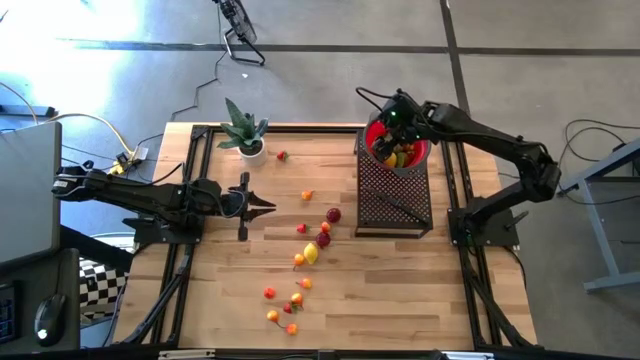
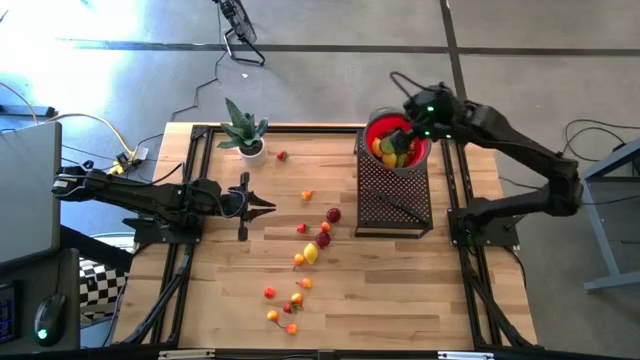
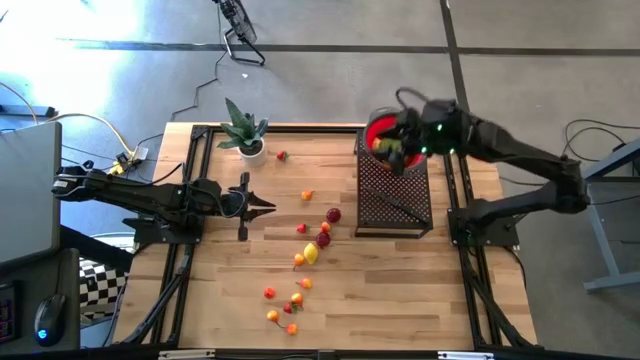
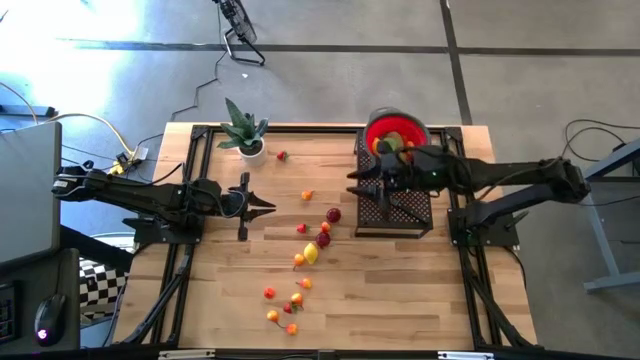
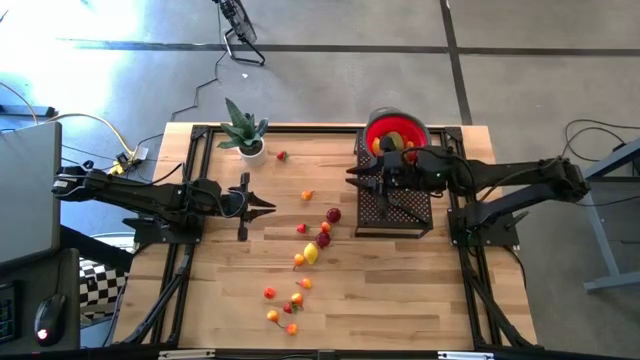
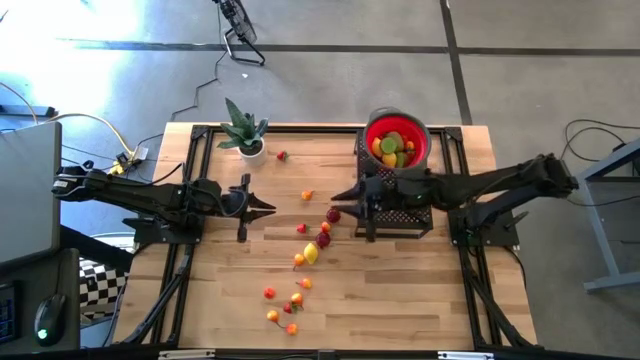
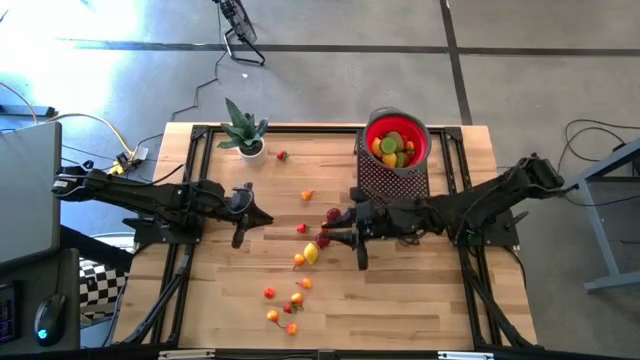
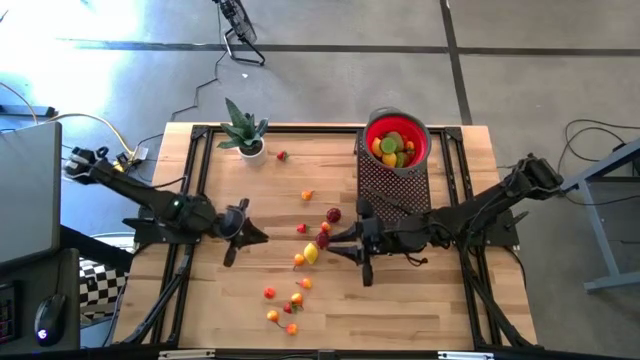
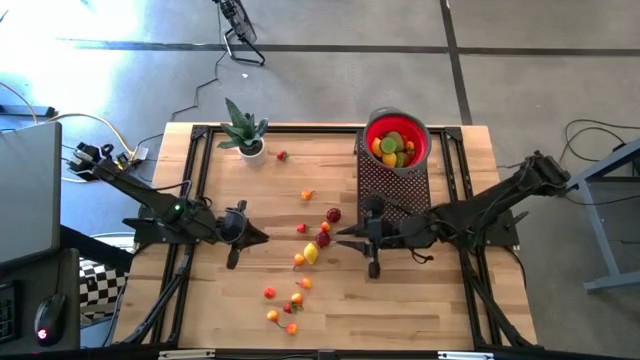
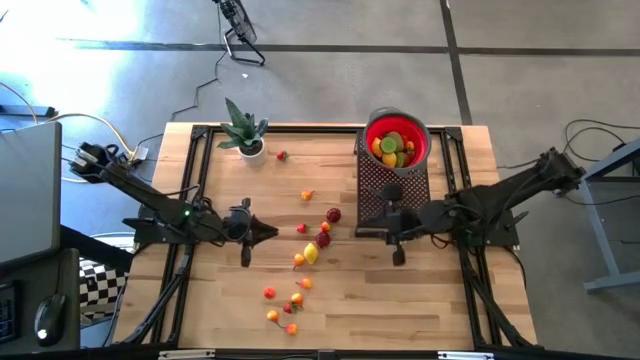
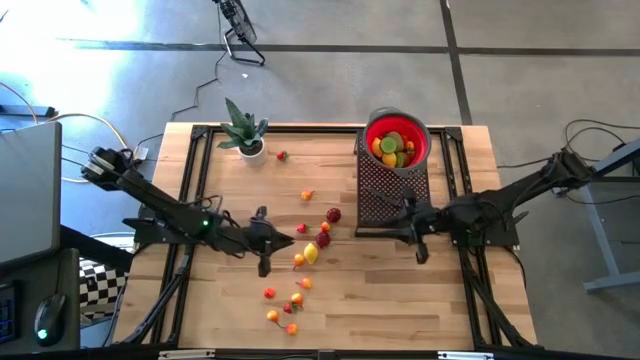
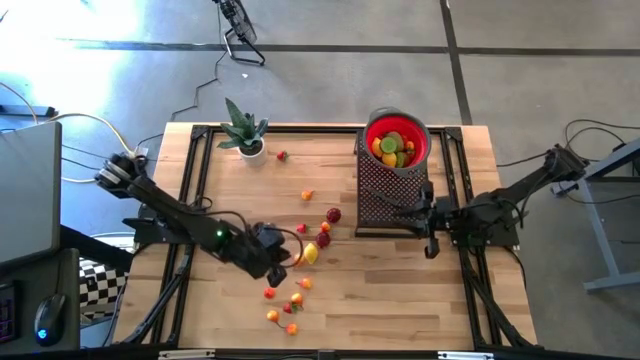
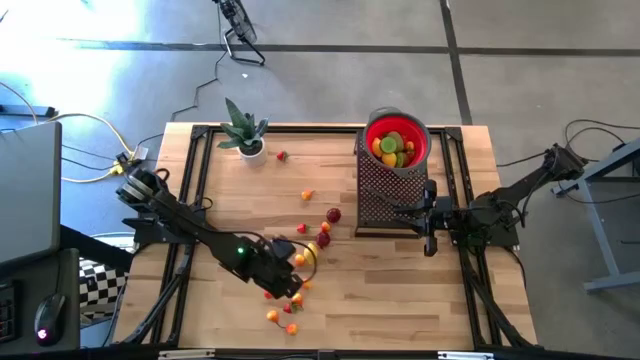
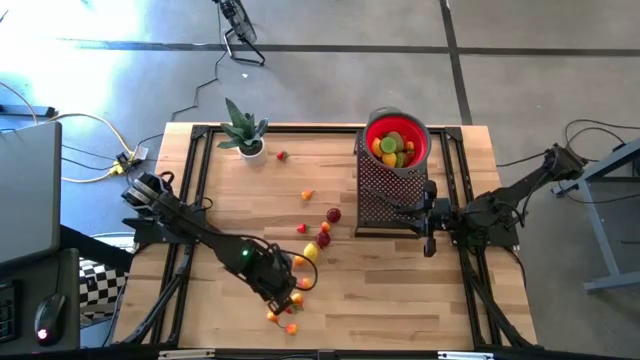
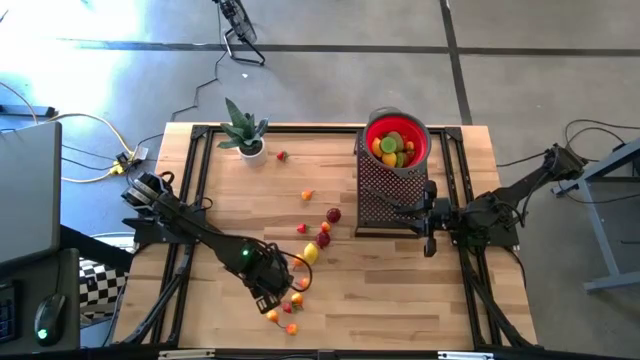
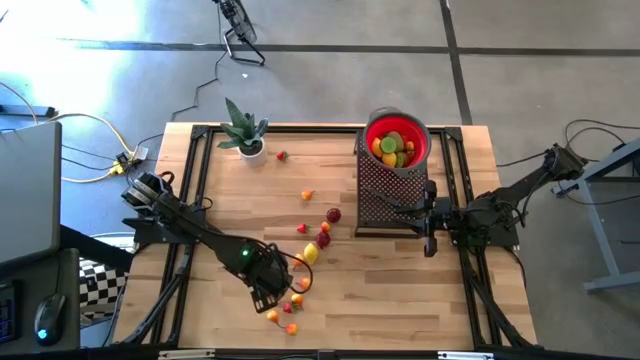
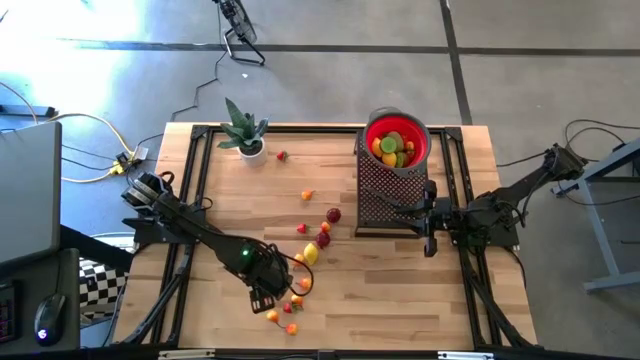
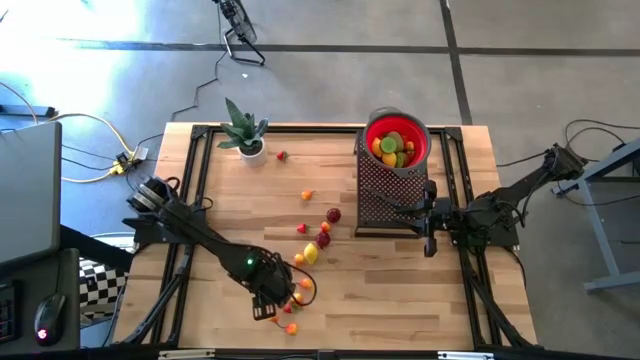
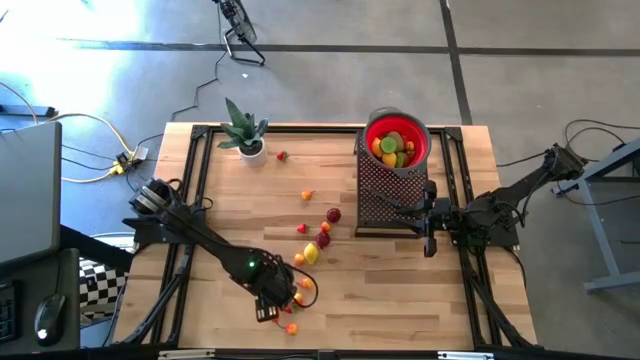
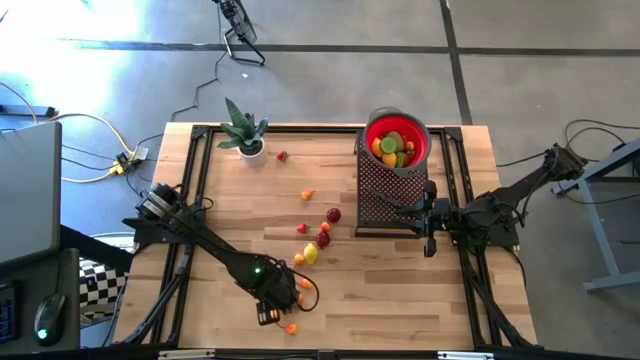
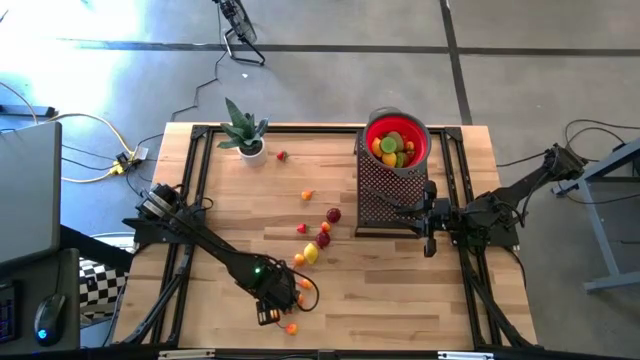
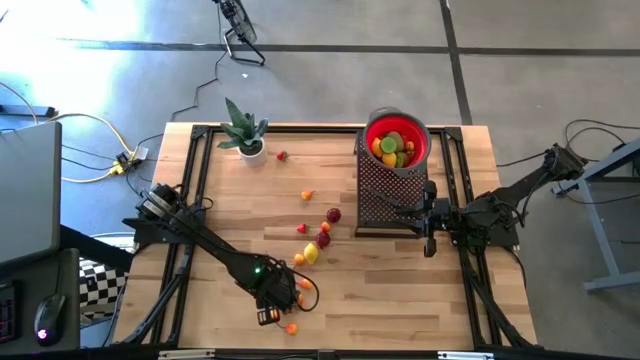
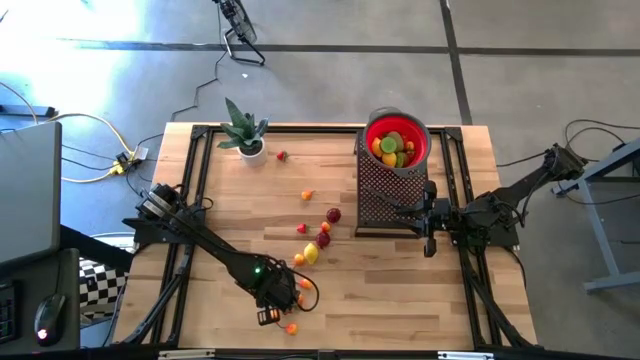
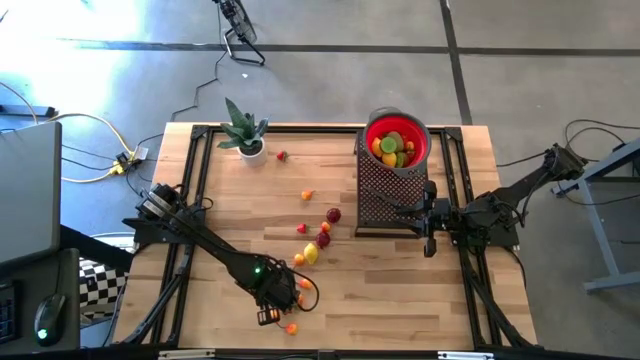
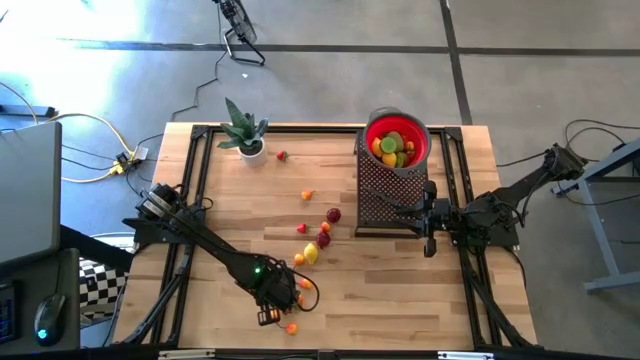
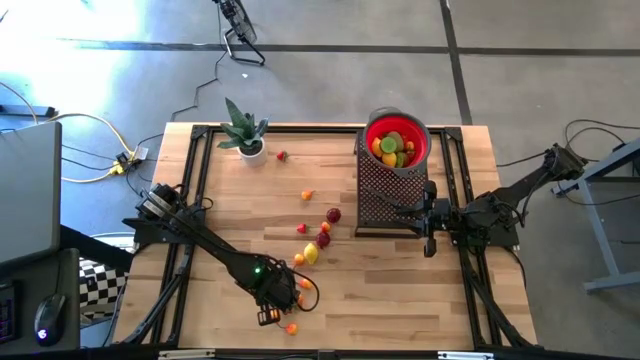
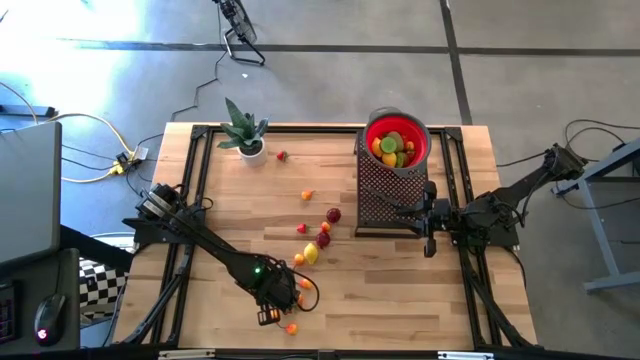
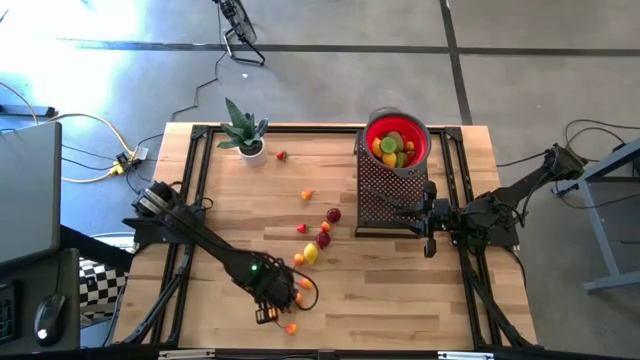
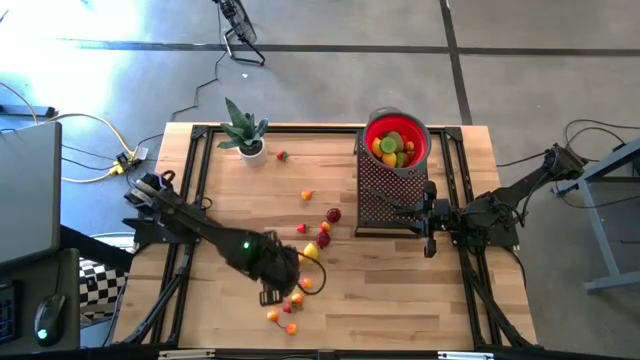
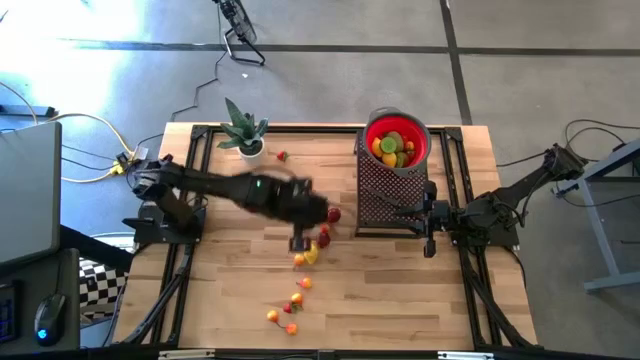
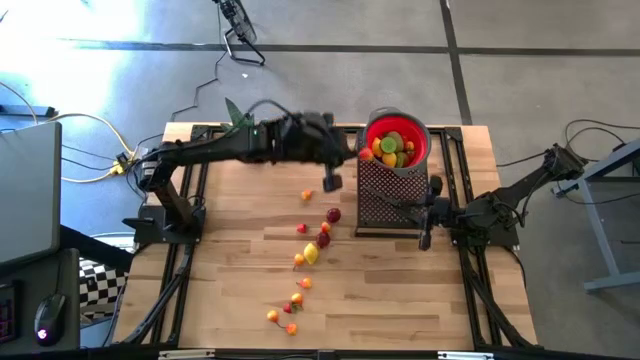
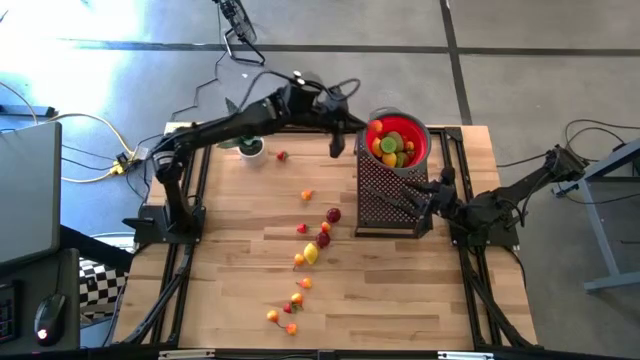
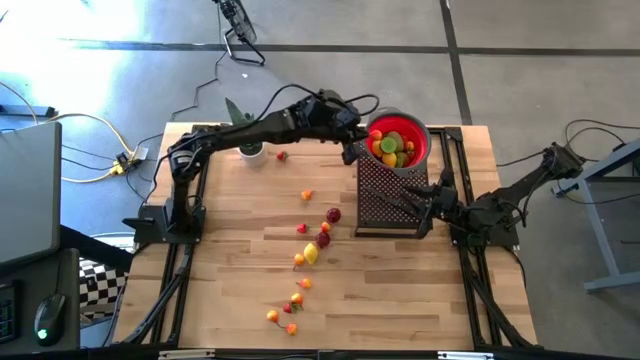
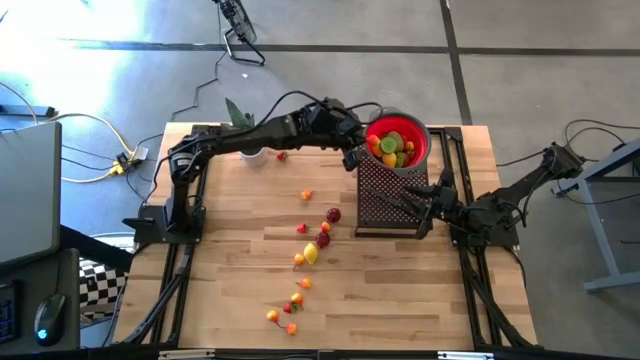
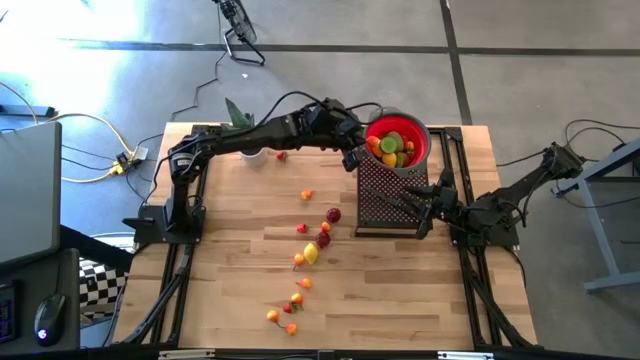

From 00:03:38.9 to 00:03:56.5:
Task: Pick & Place Fruit
Put the pear into the strainer bowl on the shelf

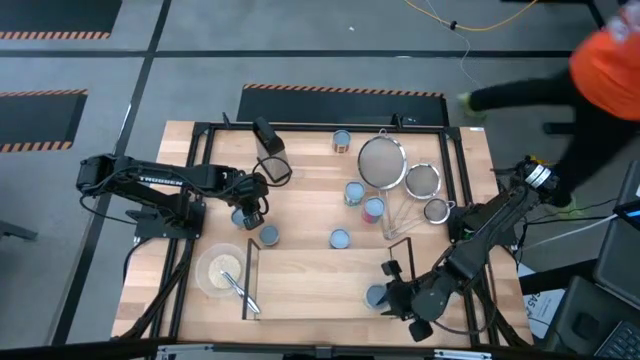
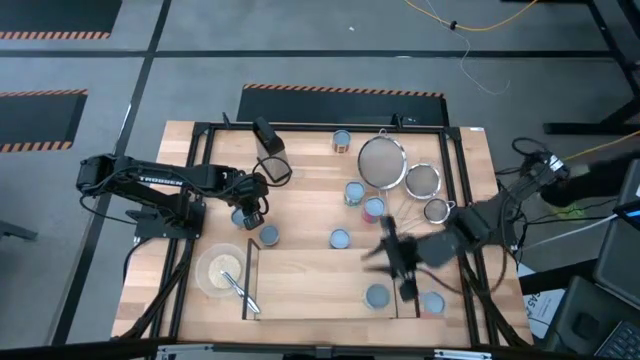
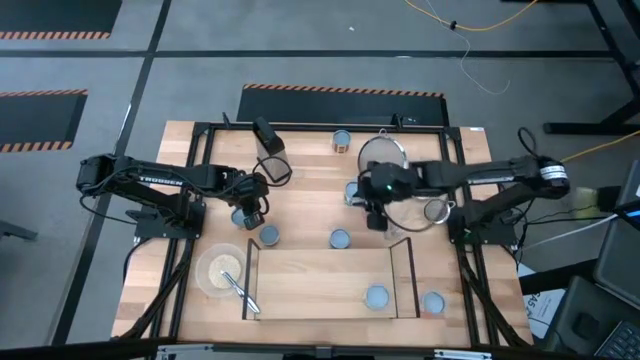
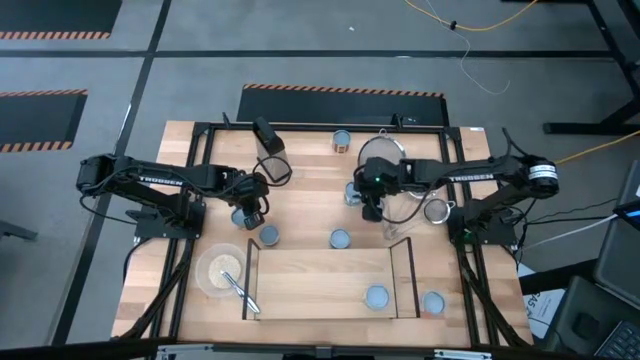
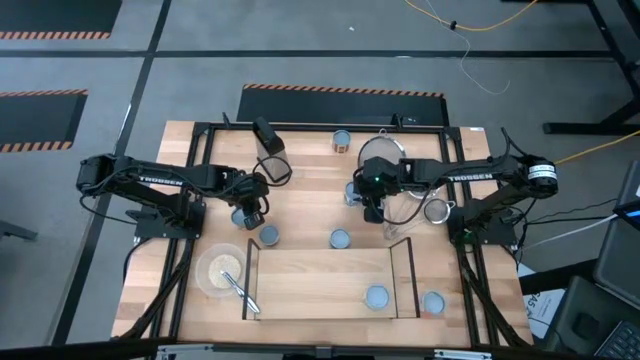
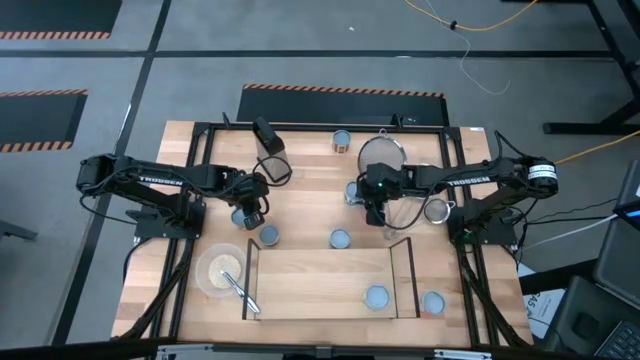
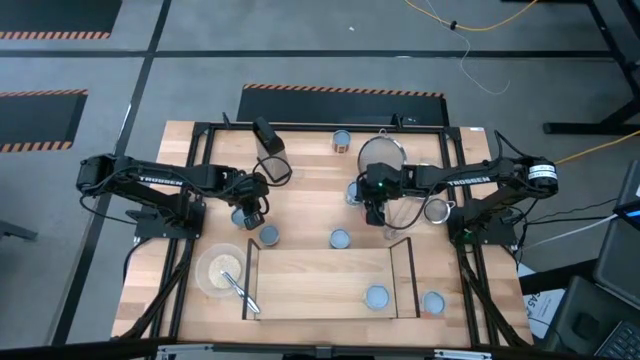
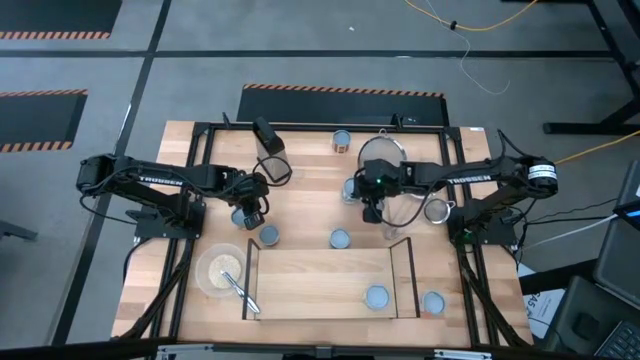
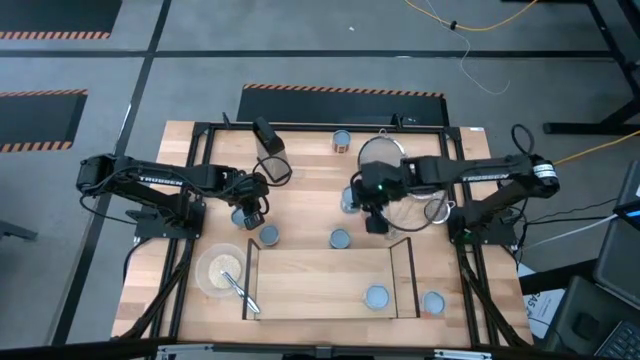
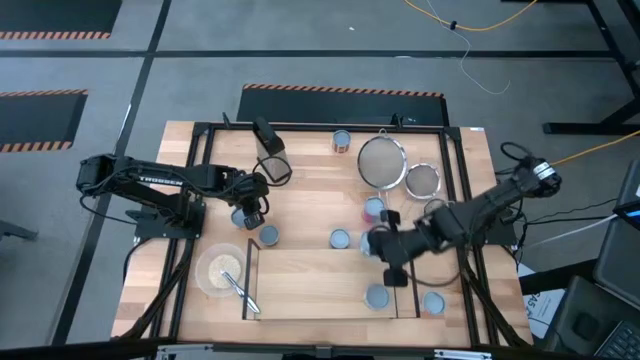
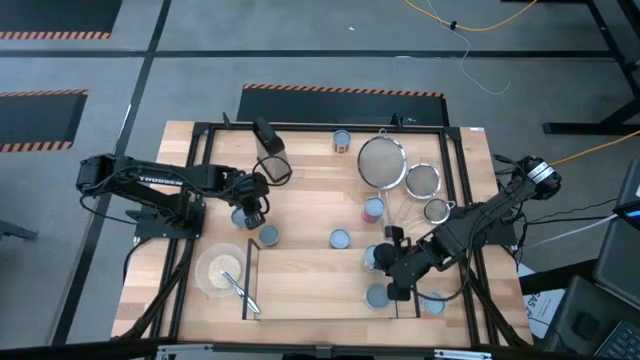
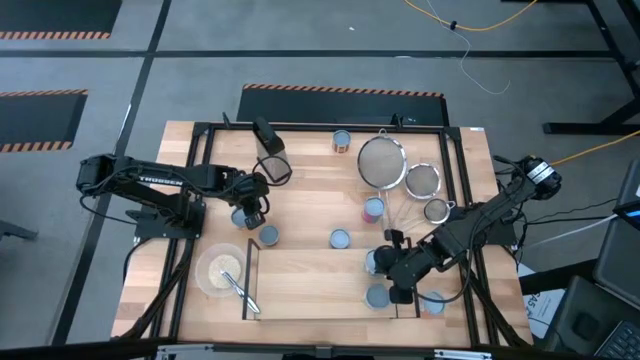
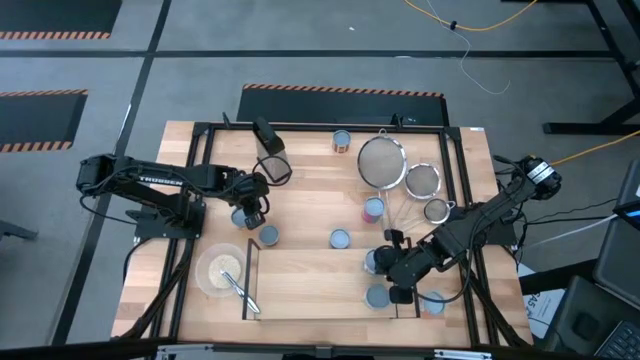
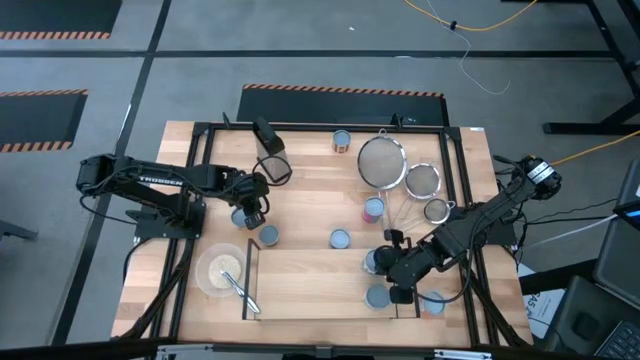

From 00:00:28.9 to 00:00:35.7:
Task: Pick and place cans onto a shelf
Put the canned mix veggies on the shelf
